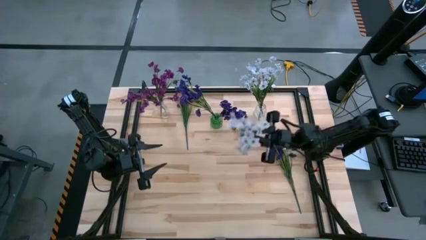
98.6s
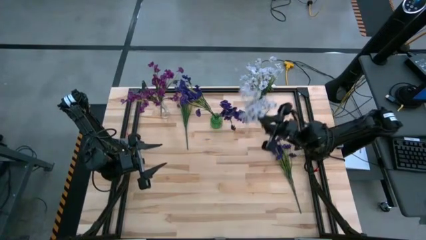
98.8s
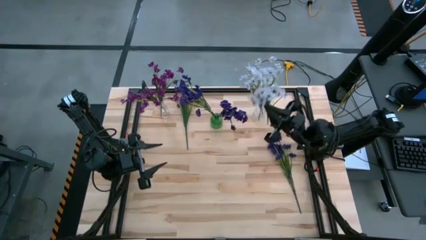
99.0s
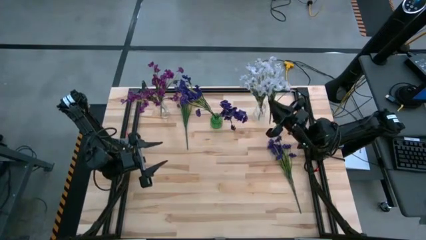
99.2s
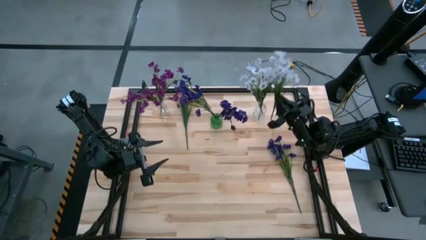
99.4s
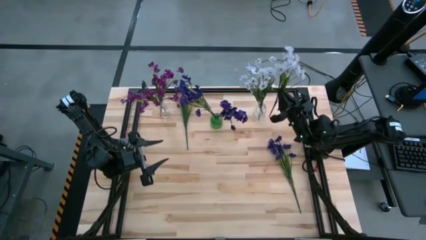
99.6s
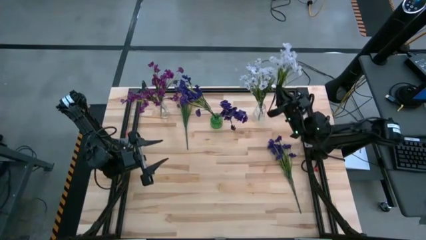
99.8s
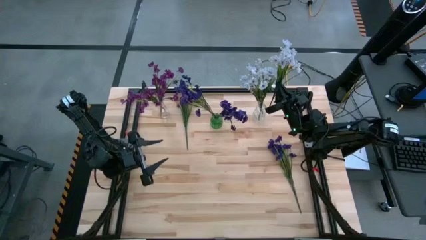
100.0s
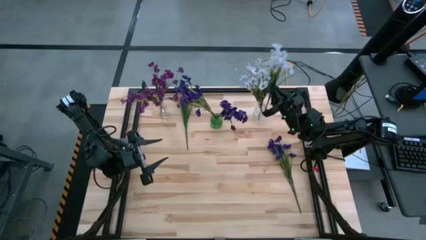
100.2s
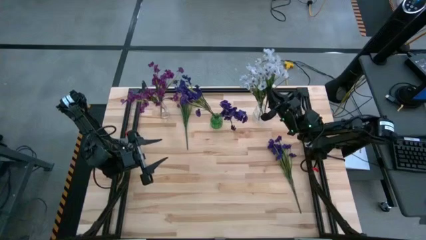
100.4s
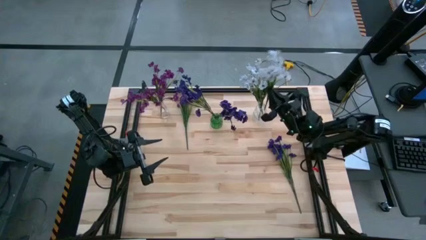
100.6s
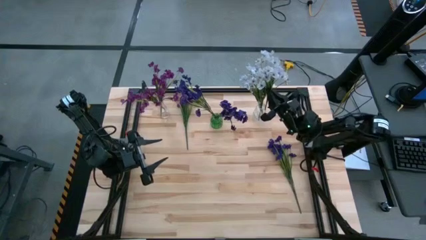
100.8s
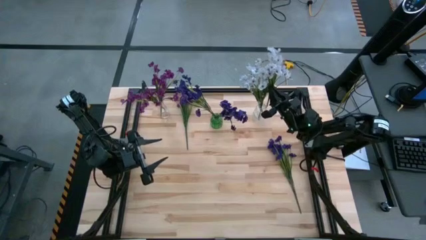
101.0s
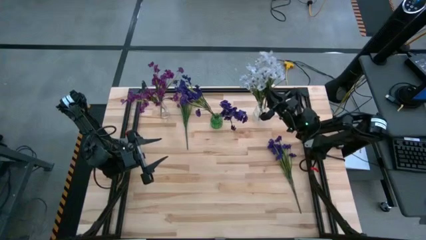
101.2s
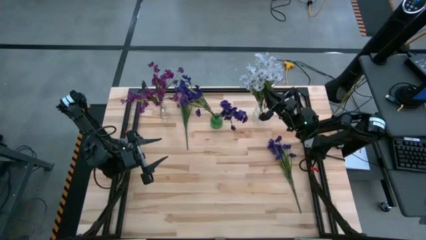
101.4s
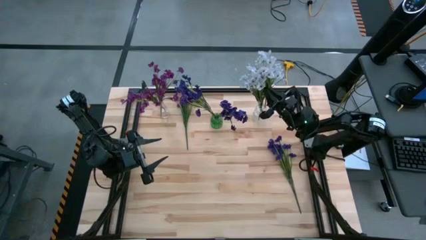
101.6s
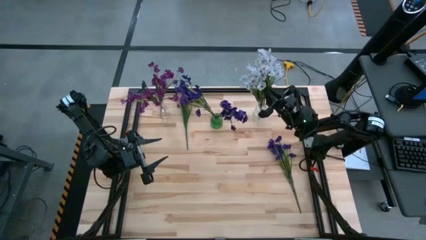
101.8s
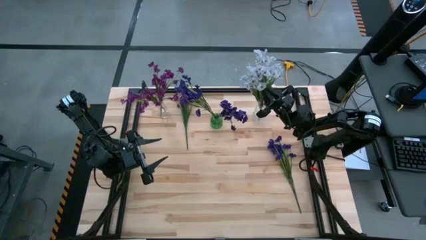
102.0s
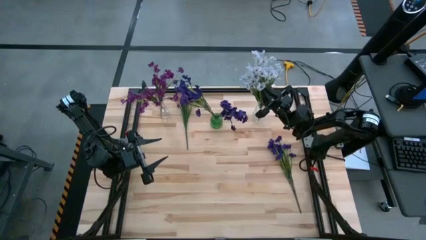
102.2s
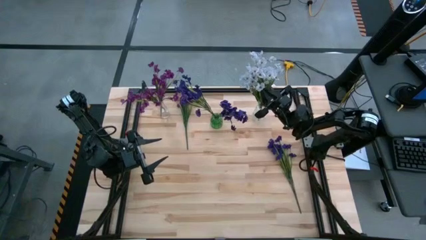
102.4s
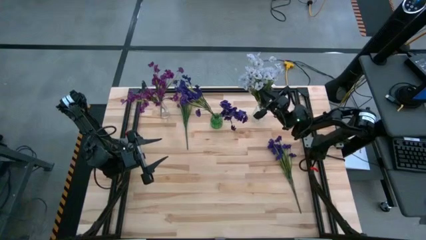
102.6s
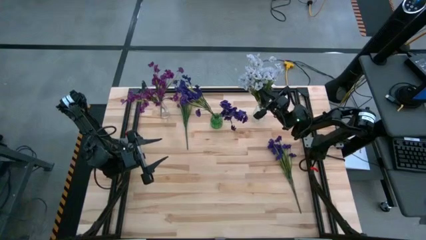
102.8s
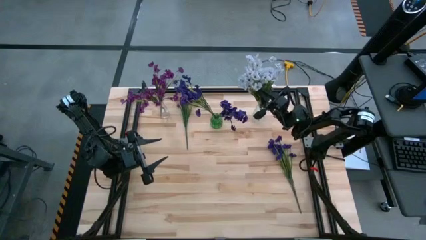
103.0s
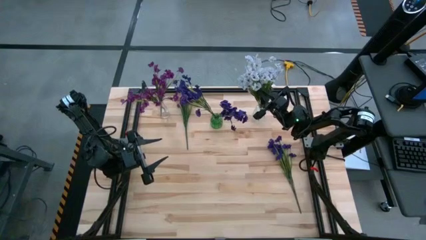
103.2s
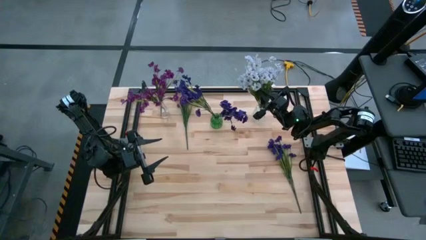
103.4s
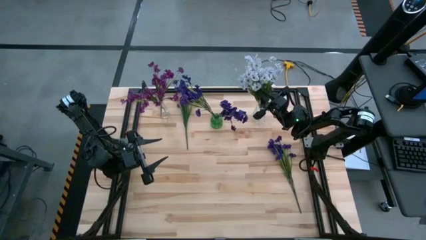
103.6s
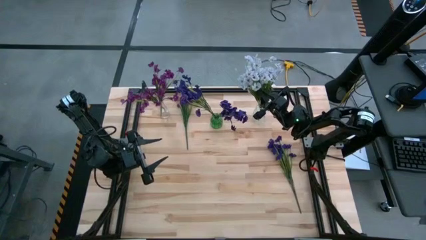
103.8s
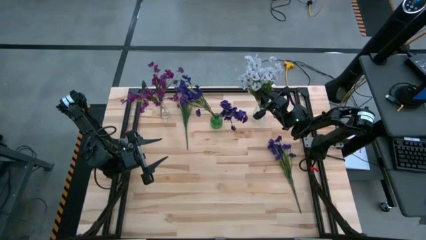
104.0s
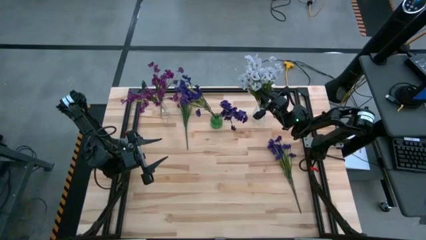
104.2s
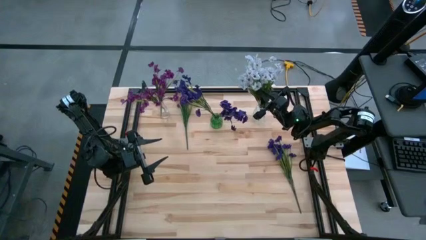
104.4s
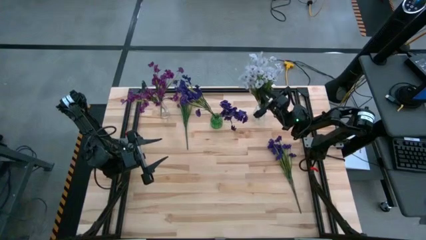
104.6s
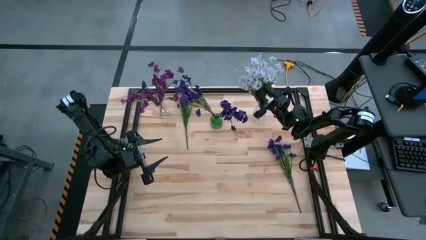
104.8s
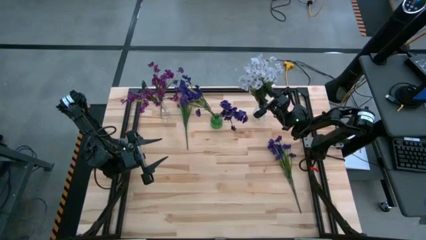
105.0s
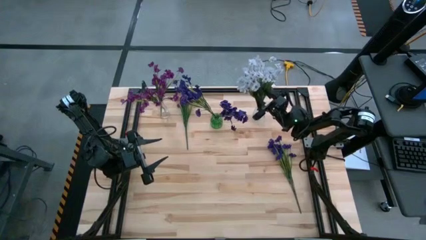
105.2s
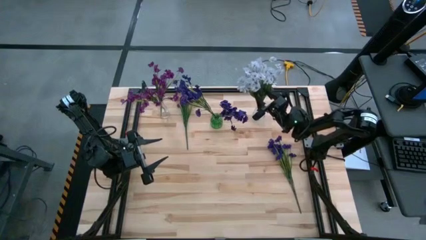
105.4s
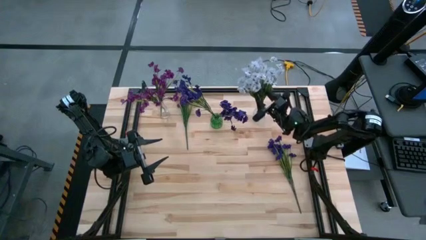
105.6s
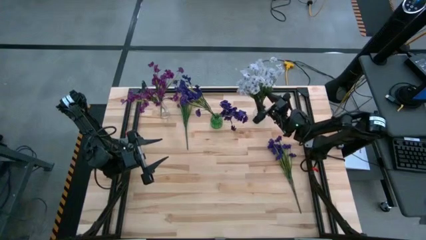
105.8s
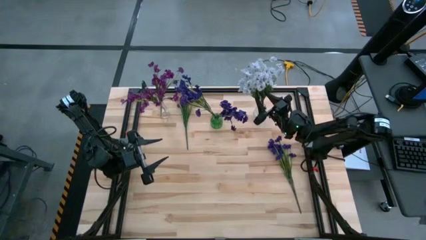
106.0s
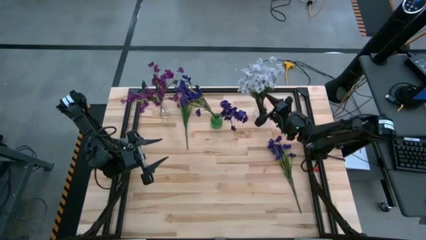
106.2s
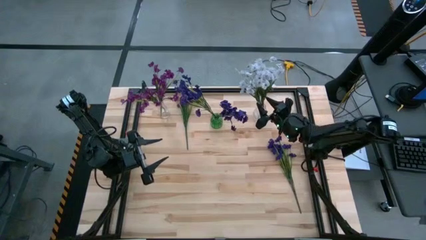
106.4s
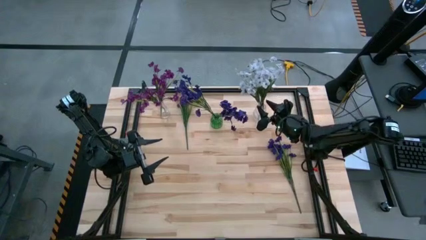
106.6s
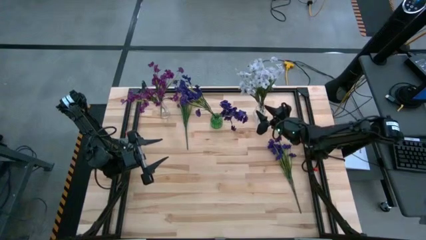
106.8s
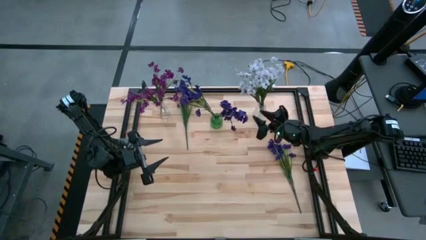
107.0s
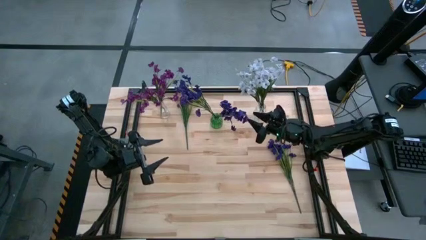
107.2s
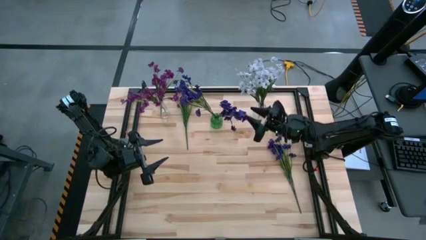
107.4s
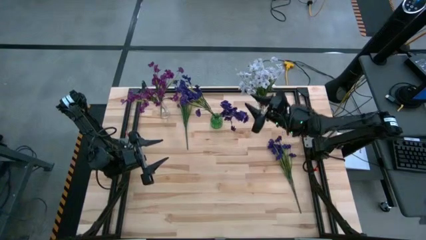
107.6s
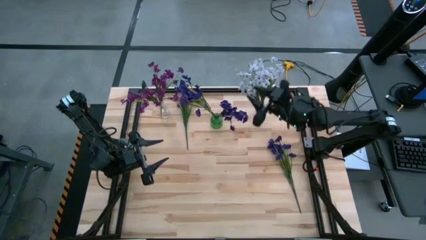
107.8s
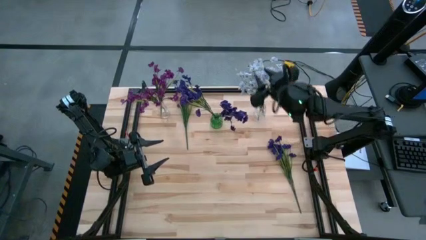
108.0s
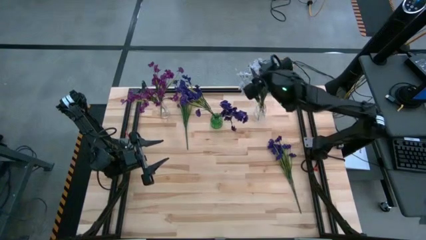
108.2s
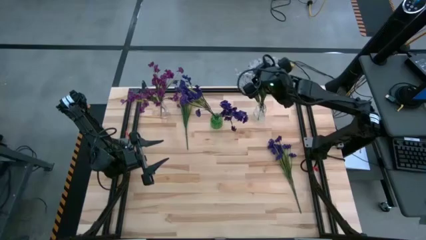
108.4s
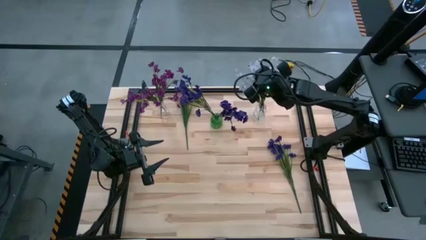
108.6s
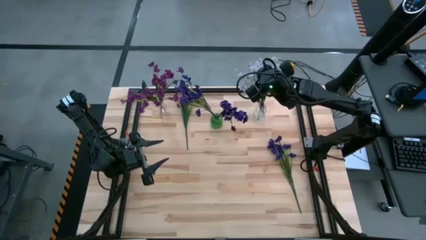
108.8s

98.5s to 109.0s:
Task: Sort flowers into vase by color
Put the white flowers into the right transparent flower vase
